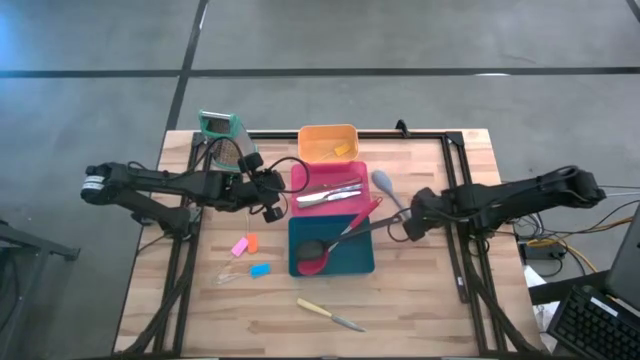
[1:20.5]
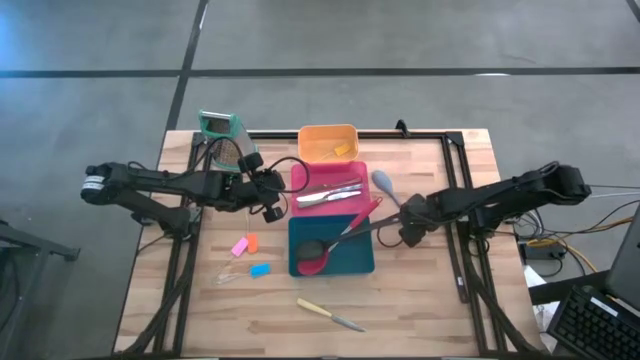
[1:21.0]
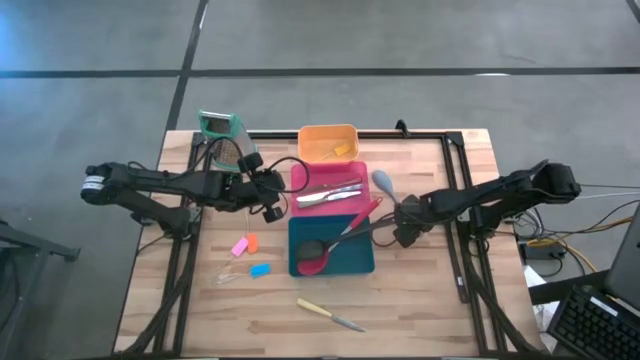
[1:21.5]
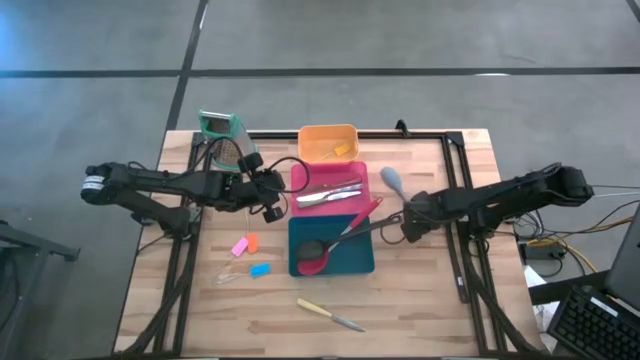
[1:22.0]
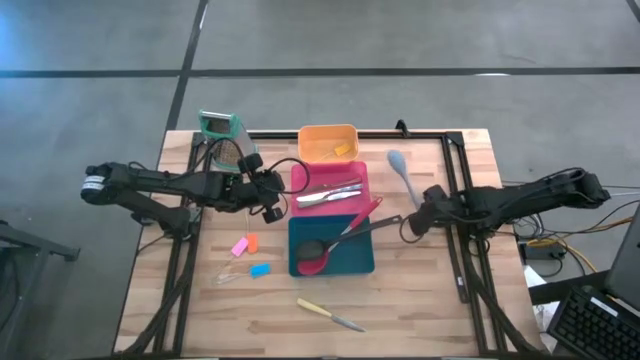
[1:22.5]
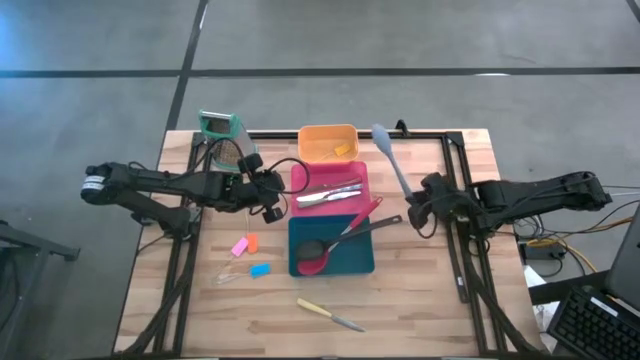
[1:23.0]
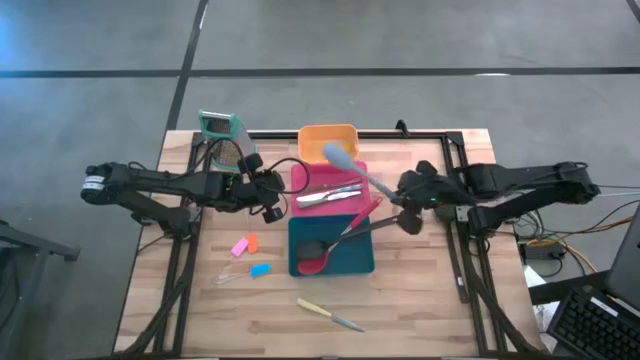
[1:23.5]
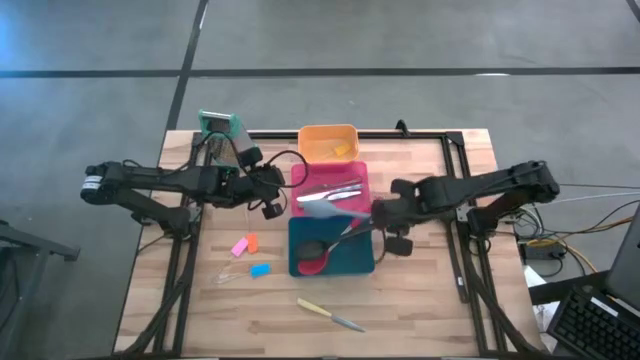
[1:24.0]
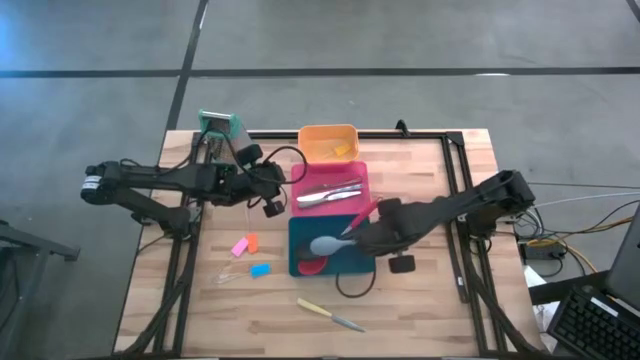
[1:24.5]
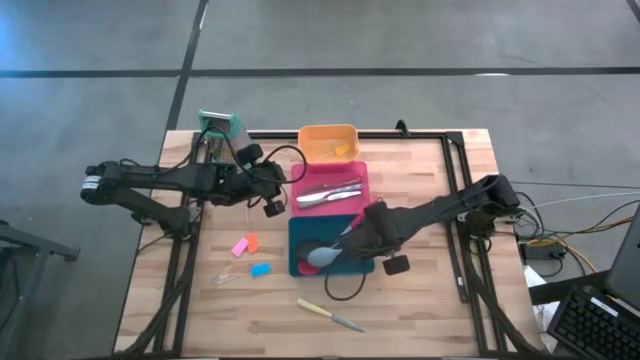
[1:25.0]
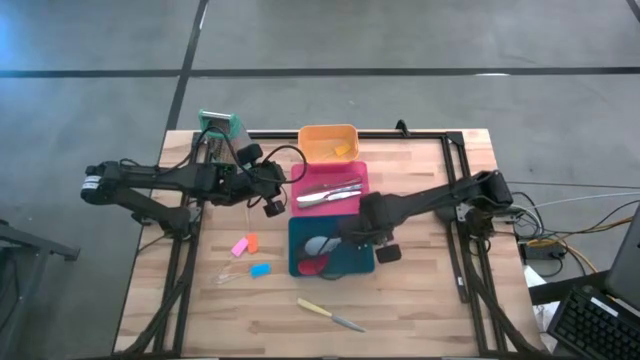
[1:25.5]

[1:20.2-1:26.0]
Task: Pick & Place Kitchen Items
Put the gray spoon into the blue bin

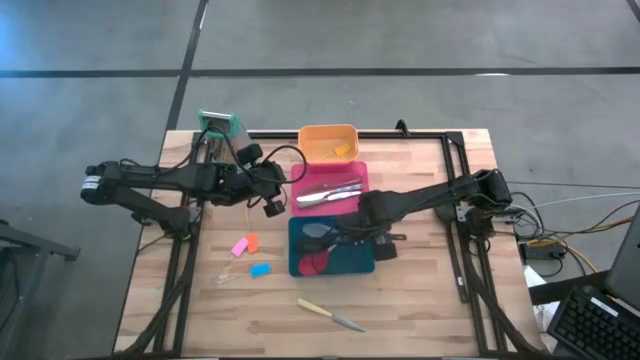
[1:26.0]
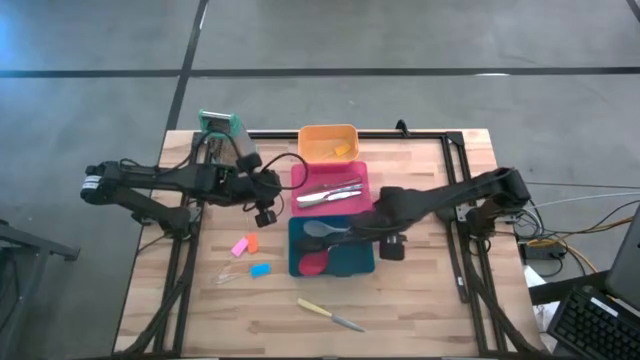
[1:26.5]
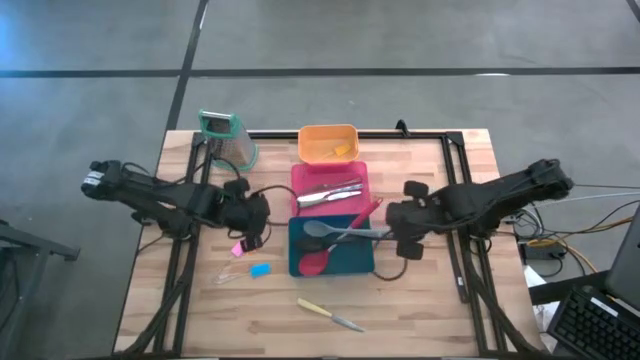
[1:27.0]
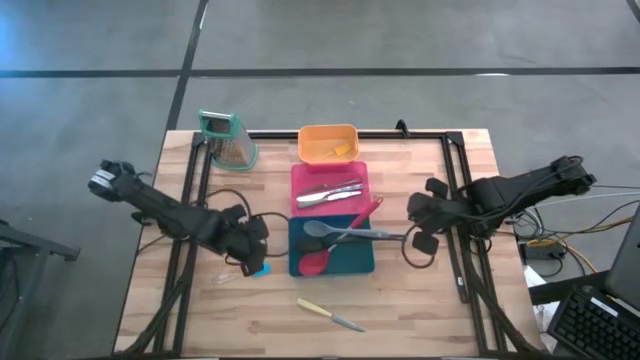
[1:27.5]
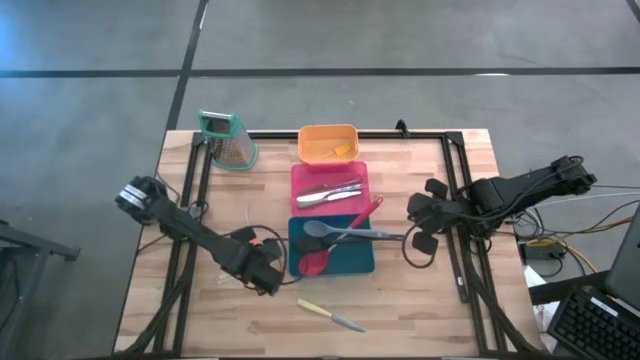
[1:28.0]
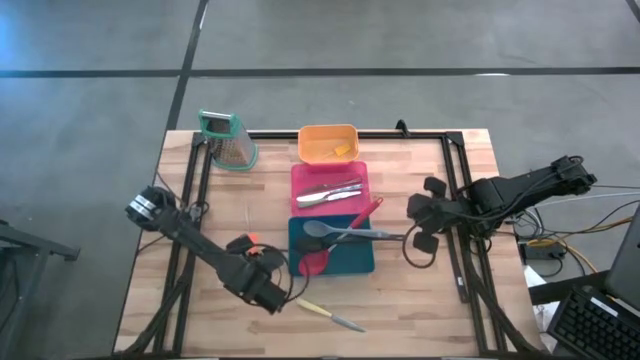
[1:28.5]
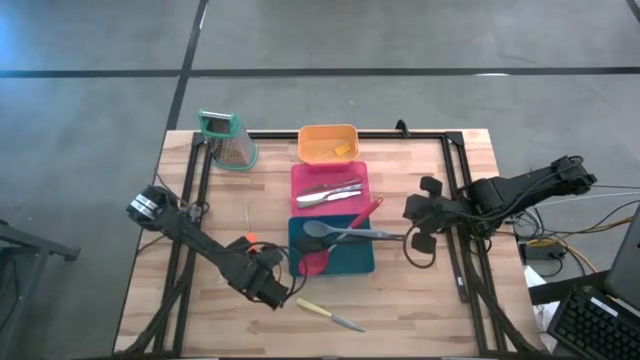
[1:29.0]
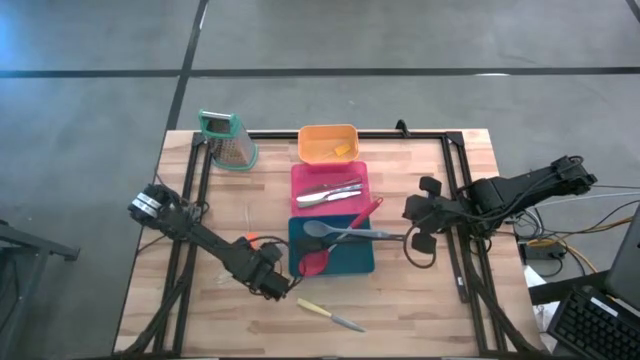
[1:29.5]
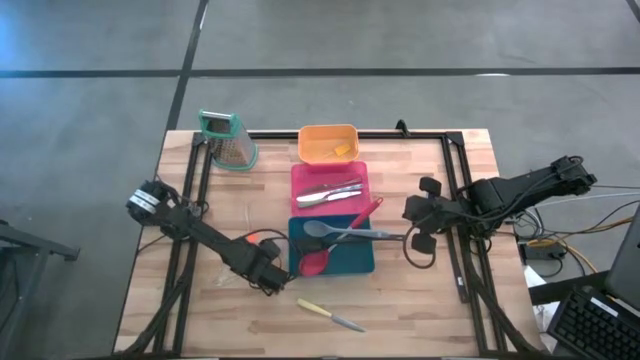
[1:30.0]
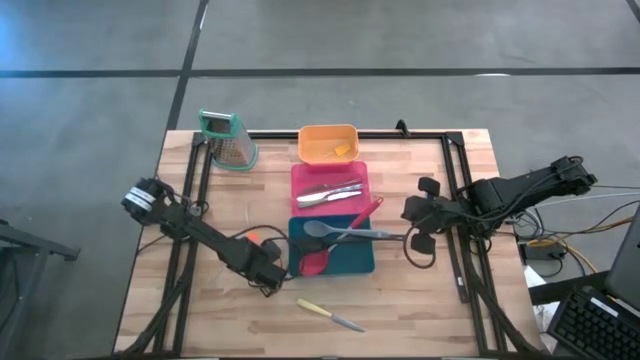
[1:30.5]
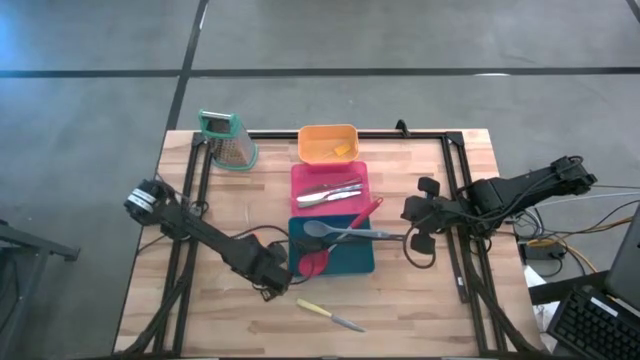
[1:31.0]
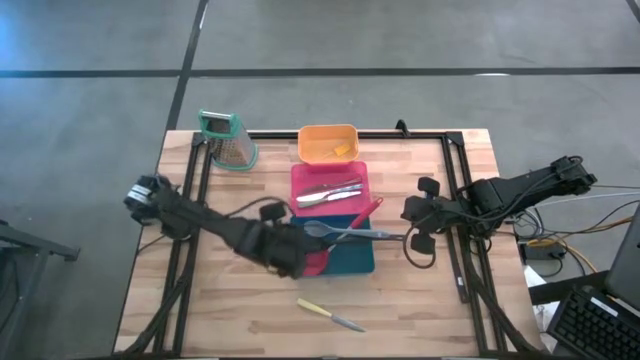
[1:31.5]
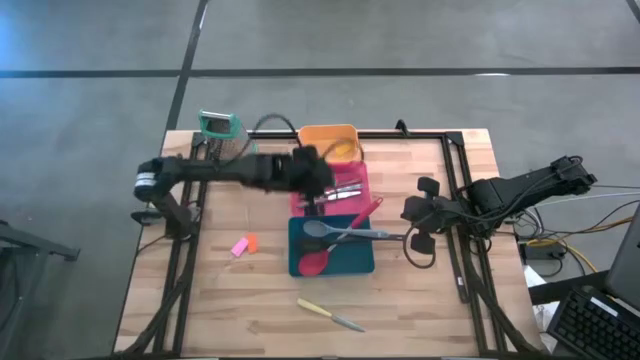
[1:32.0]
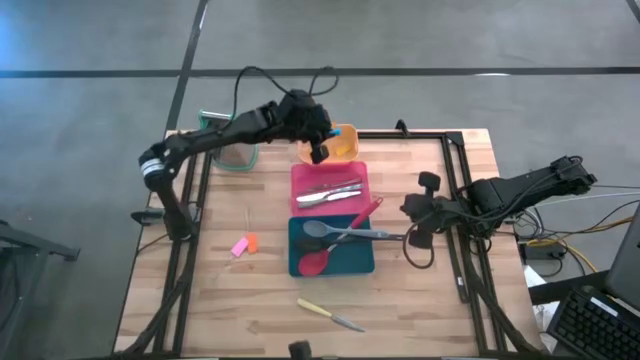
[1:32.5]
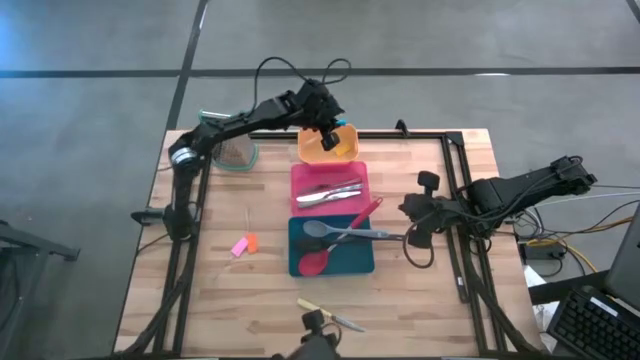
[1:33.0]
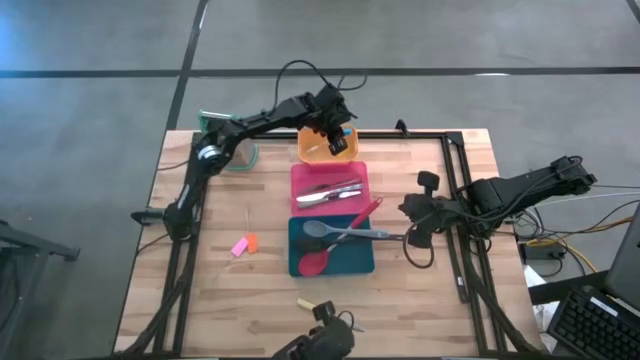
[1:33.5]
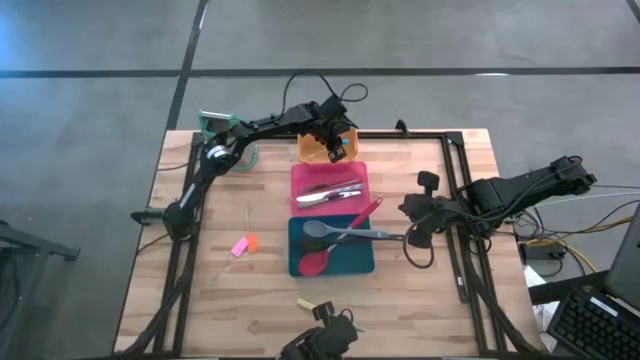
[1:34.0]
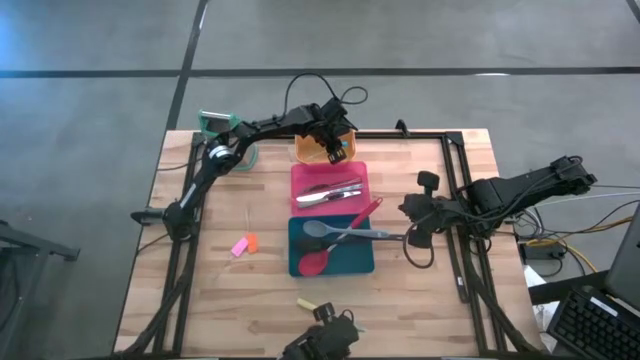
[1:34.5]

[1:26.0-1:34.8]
Put the blue spatula into the yellow bin

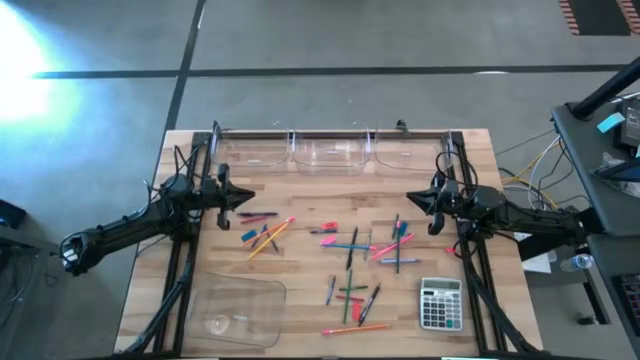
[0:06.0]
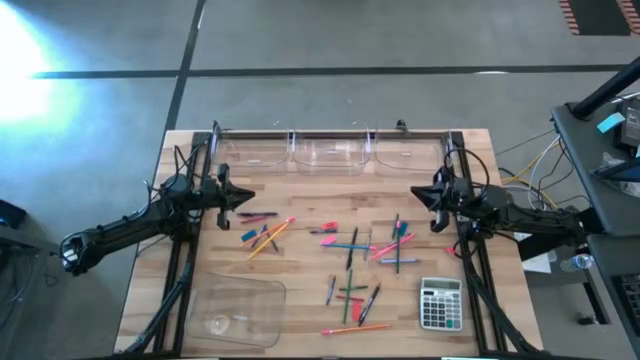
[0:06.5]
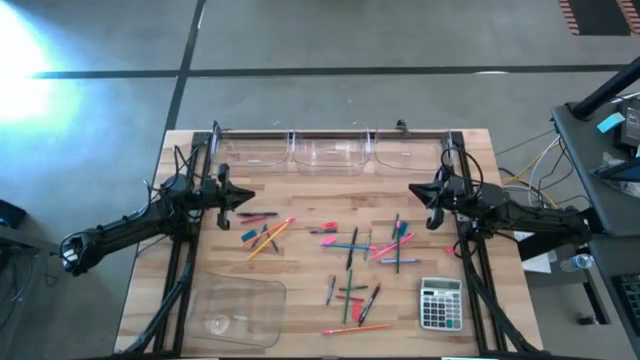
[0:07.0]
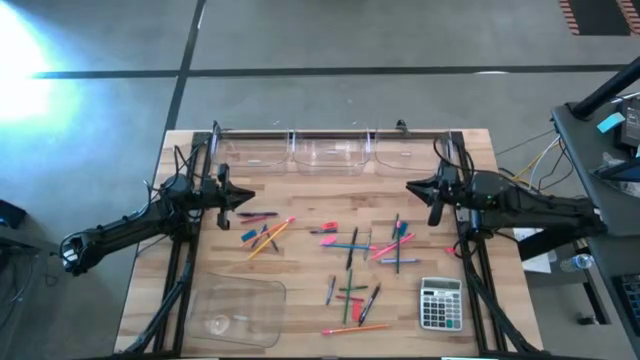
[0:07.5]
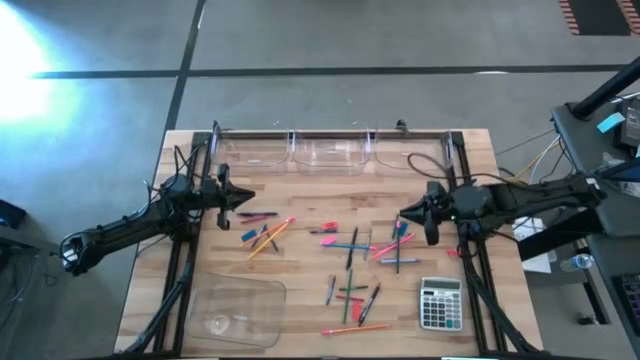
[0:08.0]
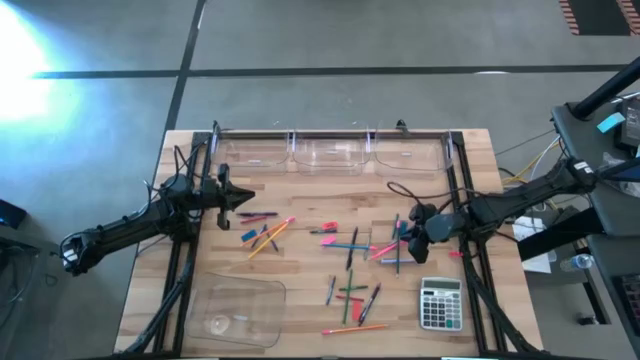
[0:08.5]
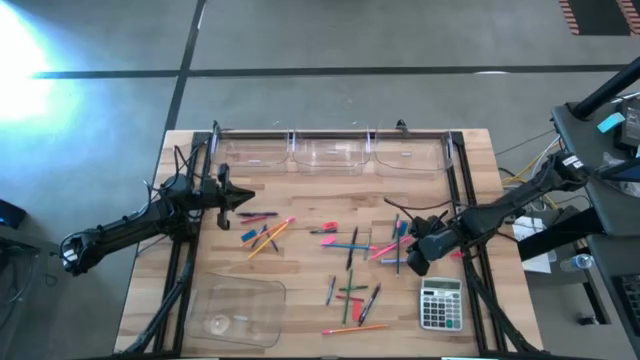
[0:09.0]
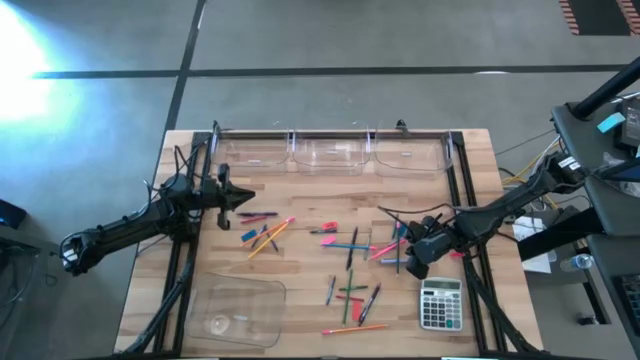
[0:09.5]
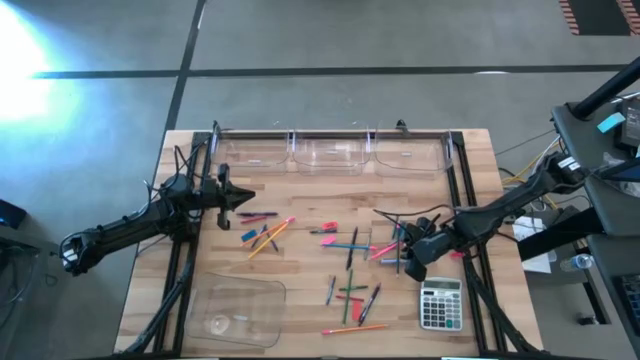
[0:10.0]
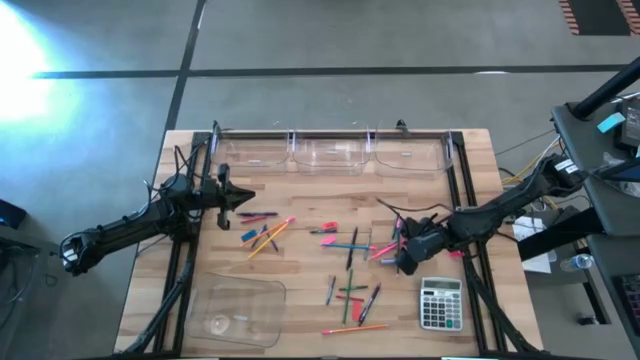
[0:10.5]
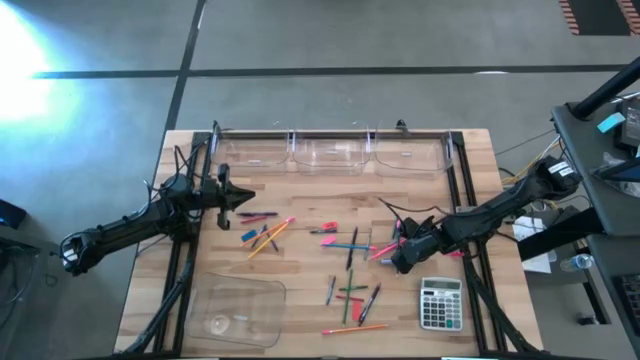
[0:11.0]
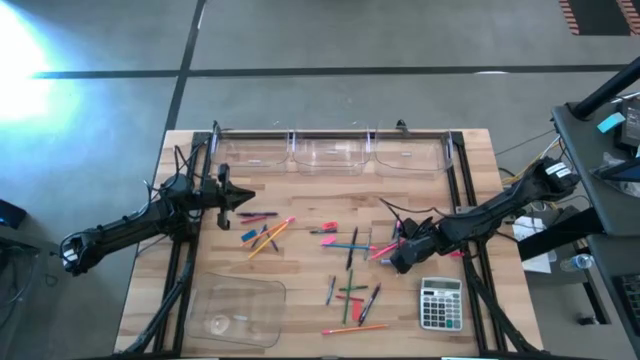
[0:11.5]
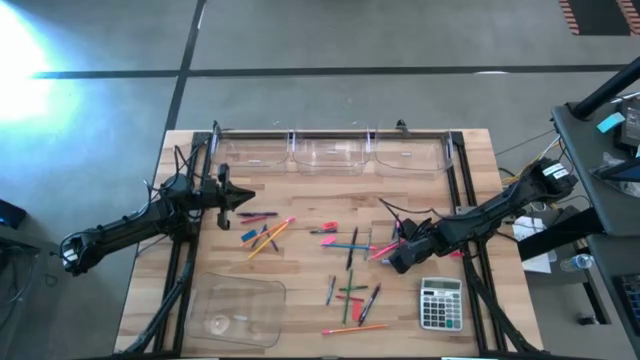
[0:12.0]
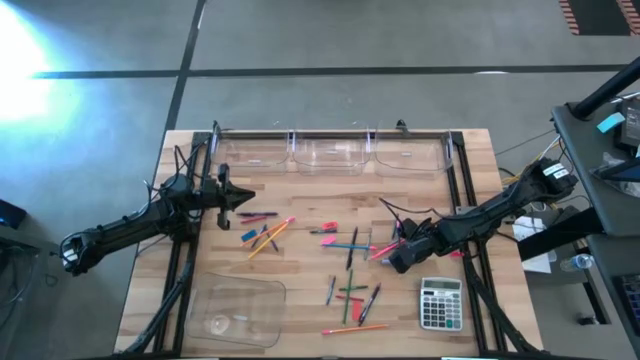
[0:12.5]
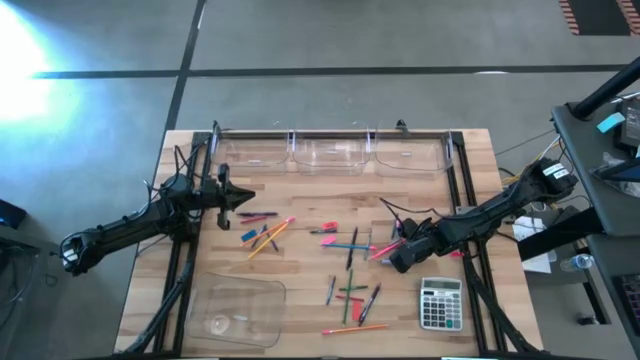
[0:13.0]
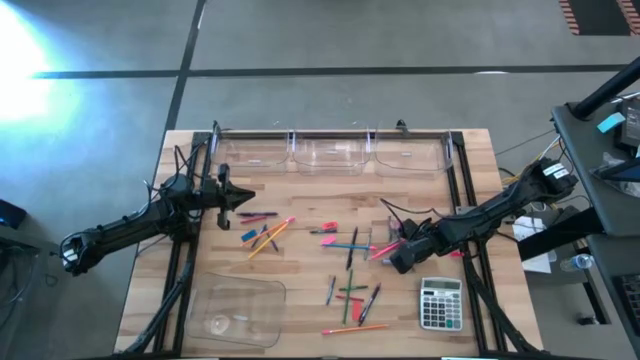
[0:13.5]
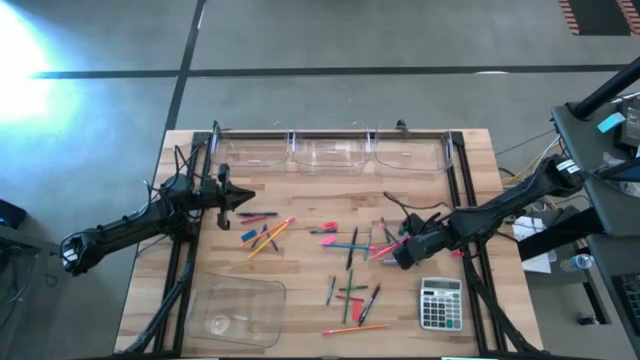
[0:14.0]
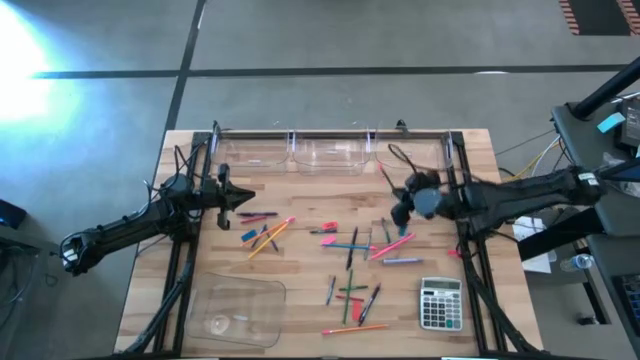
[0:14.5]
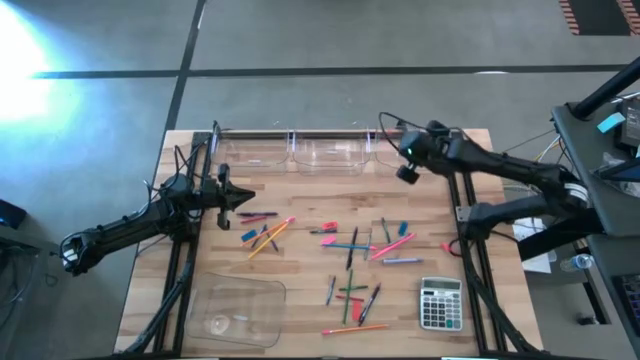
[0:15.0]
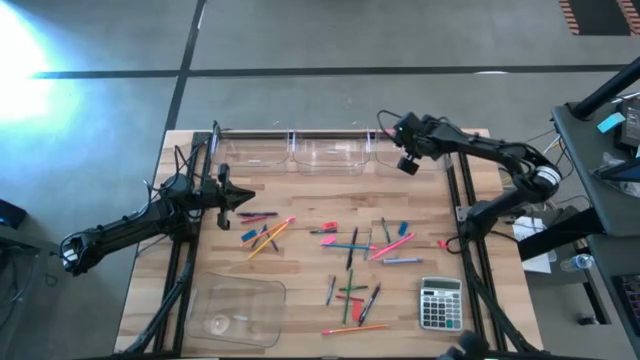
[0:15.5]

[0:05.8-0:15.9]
Task: Sort crayons/erasers/pens/pencils in bins
Put the green pencil into the top right transparent bin
